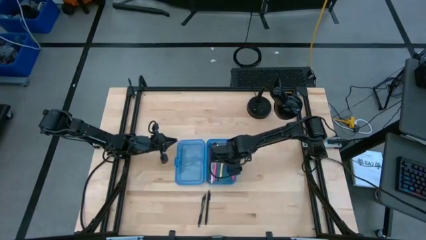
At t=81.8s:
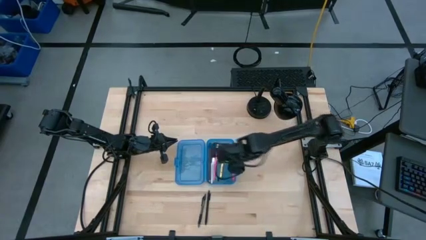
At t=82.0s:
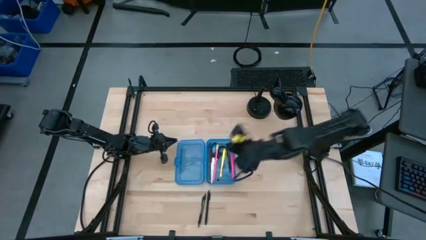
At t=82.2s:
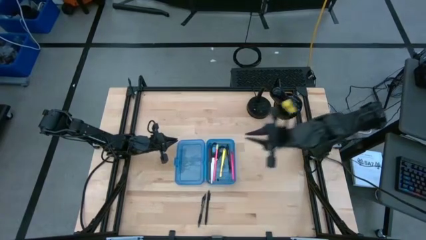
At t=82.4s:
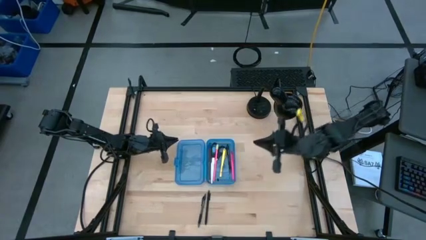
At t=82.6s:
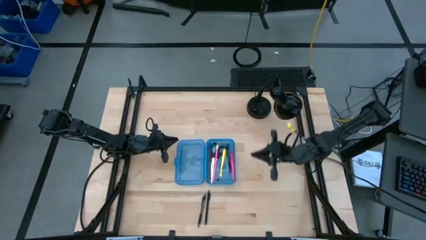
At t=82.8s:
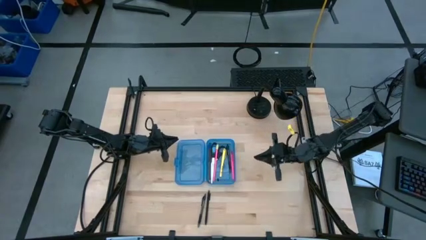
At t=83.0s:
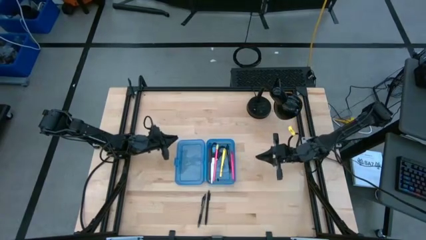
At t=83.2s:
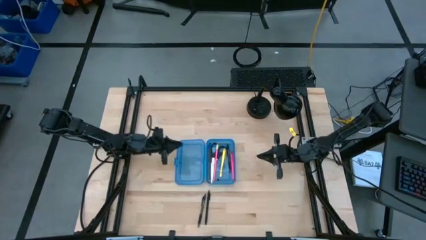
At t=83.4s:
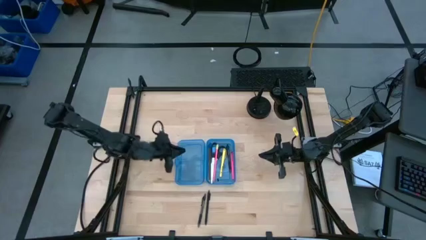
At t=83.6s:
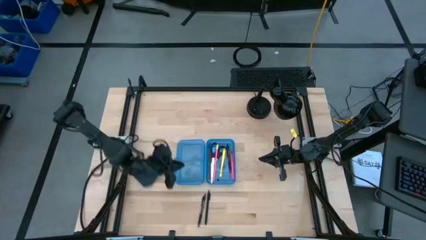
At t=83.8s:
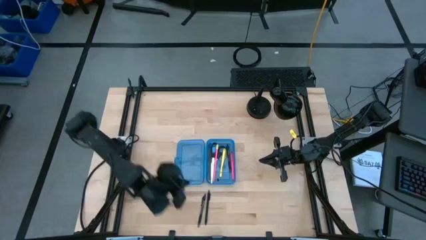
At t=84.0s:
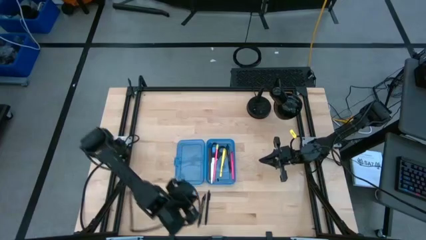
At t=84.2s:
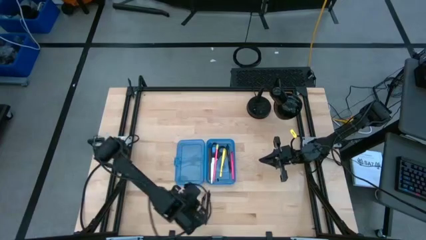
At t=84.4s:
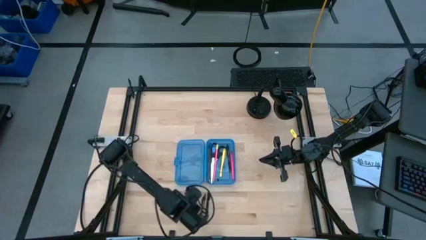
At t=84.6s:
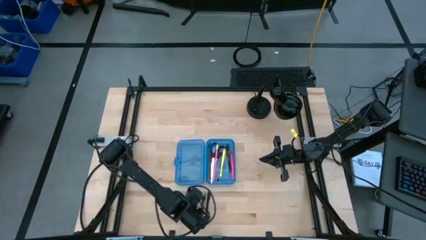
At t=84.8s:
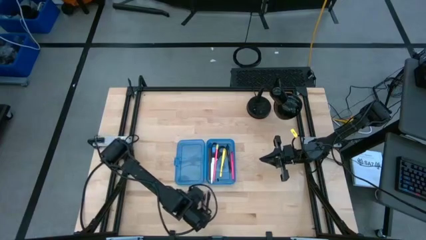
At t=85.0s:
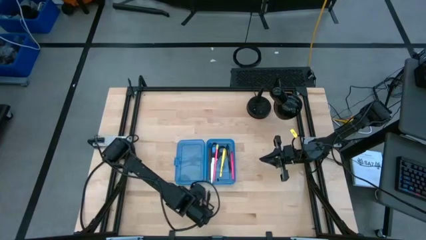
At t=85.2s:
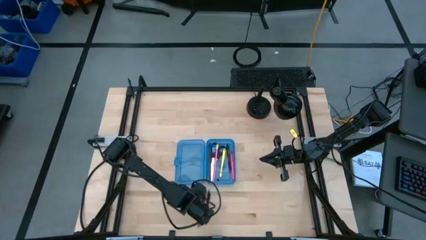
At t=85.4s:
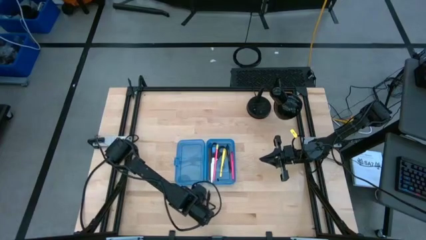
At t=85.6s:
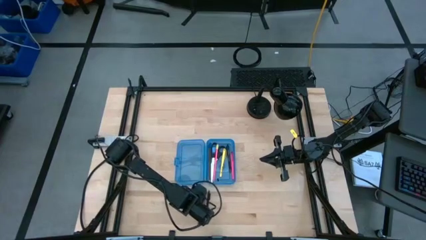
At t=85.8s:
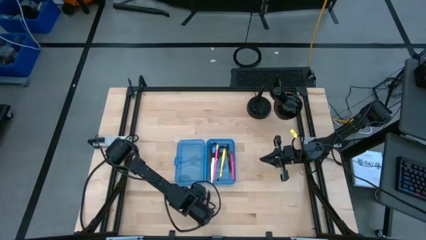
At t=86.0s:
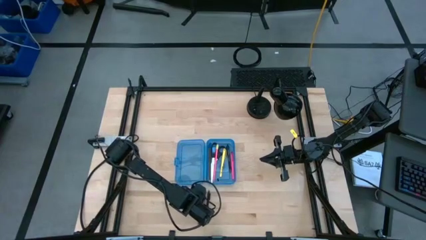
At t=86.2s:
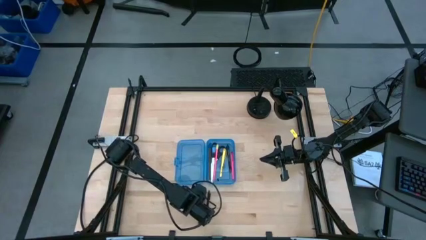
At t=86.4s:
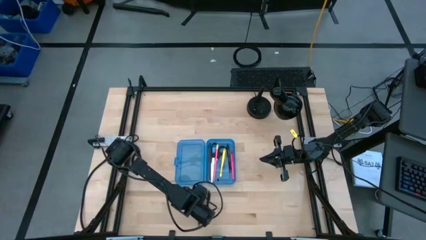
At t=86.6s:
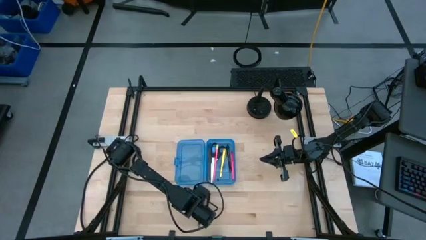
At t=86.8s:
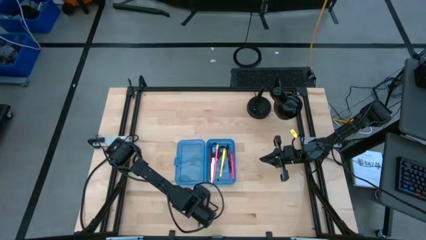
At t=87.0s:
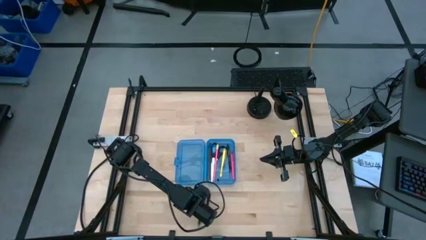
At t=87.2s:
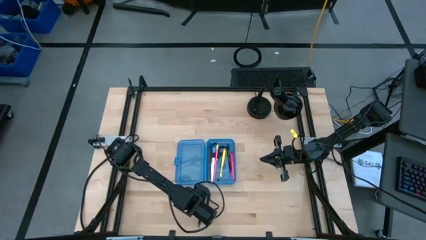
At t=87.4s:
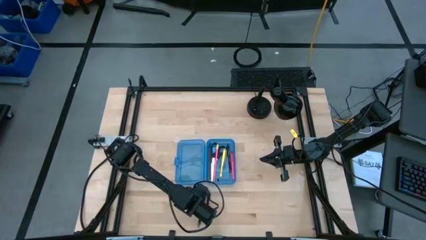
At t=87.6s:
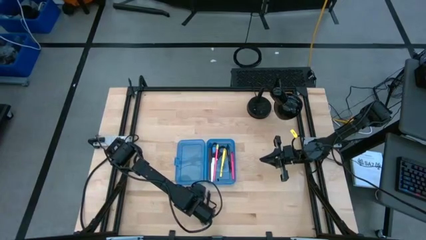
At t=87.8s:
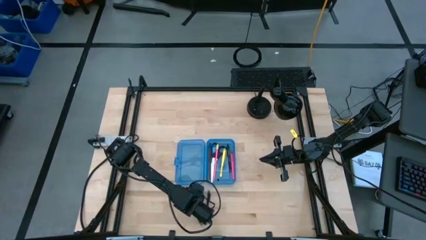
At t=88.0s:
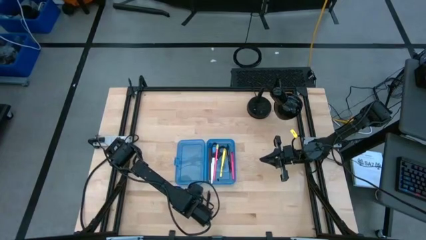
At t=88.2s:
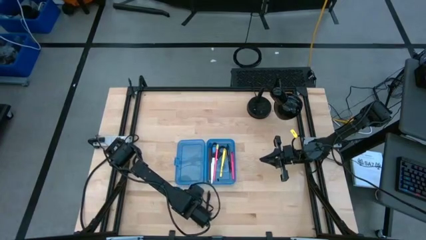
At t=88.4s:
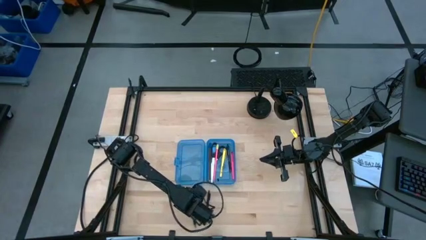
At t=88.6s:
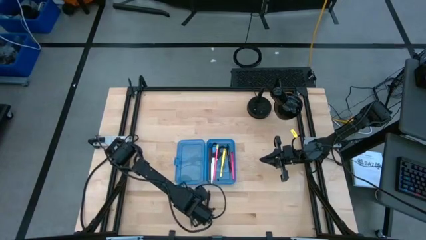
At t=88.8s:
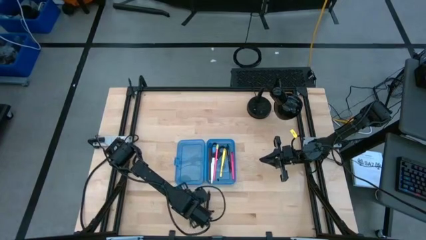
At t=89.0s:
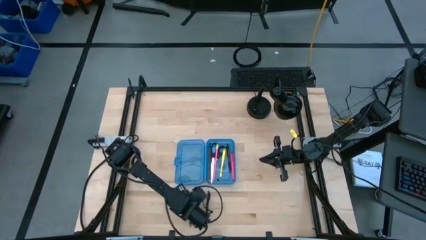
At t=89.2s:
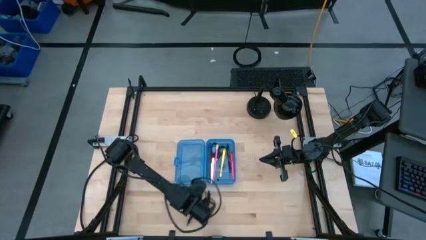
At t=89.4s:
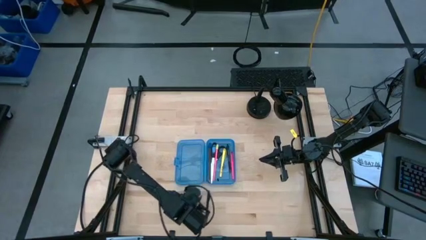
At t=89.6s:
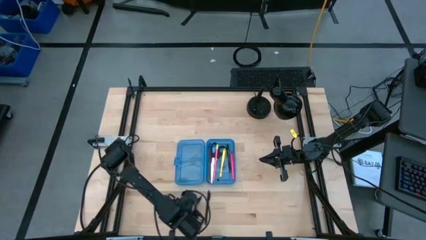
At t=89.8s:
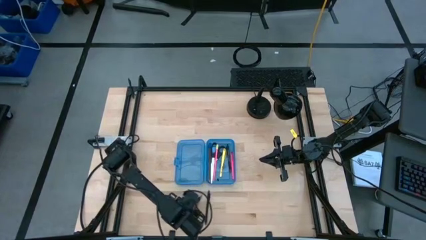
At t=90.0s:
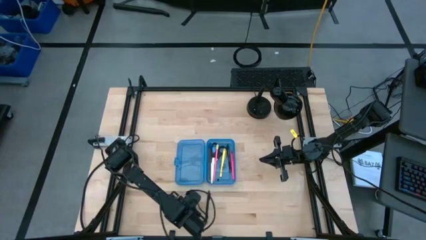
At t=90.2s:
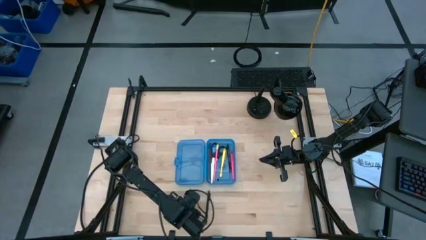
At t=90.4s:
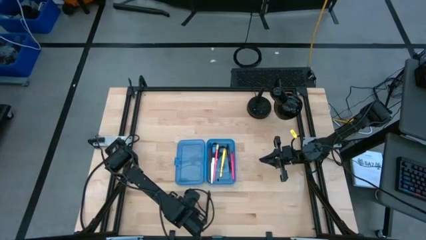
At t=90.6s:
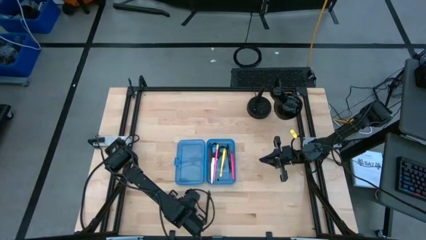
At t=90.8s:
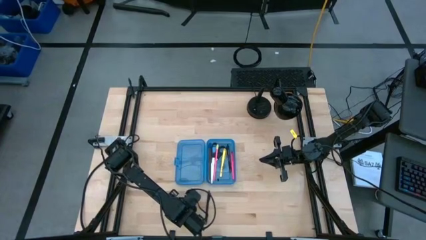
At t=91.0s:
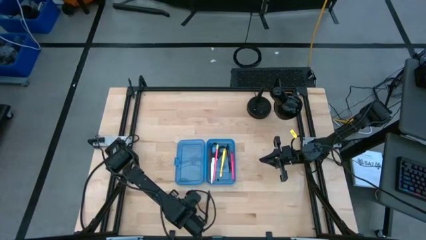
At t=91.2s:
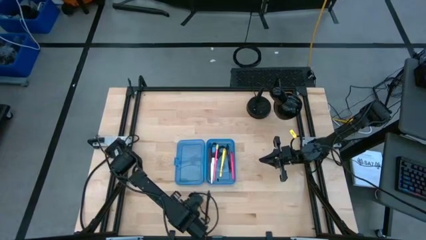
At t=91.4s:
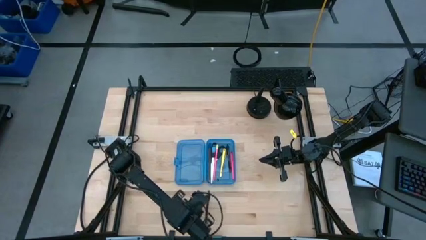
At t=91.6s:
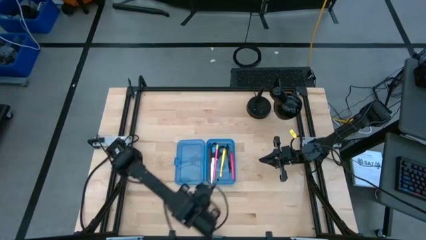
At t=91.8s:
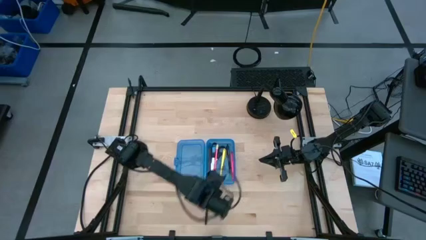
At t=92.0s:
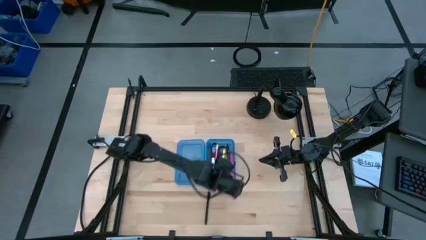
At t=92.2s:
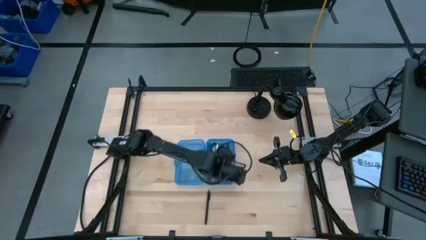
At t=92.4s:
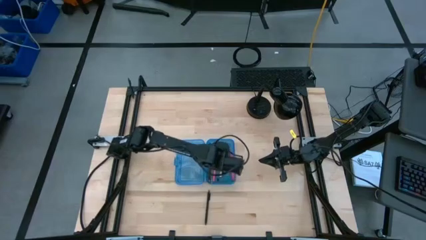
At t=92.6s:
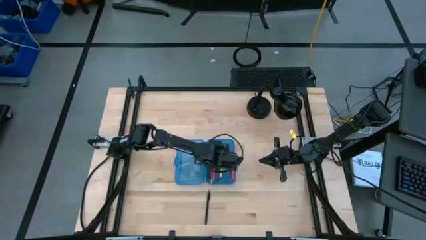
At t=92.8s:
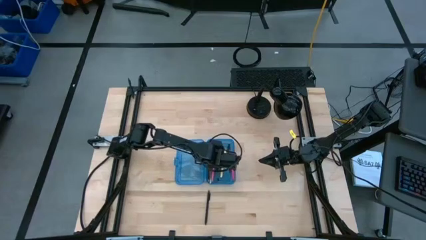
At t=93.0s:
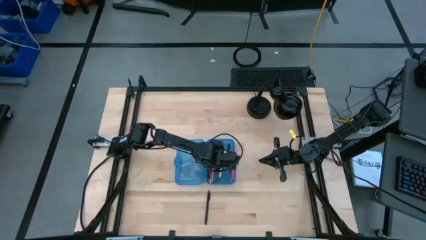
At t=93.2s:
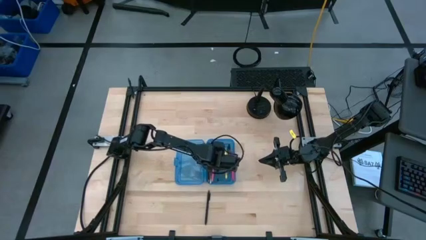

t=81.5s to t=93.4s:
Task: Pick & place school supplies into a supply box
Put the left black pen into the blue supply box

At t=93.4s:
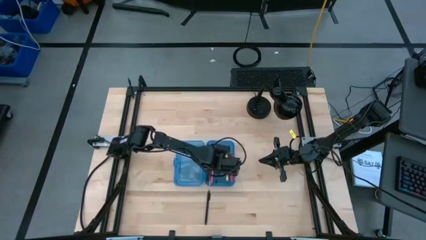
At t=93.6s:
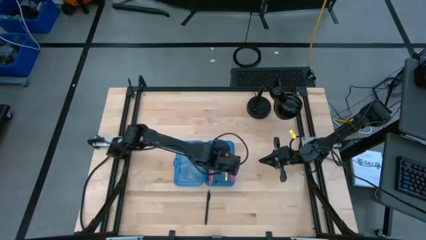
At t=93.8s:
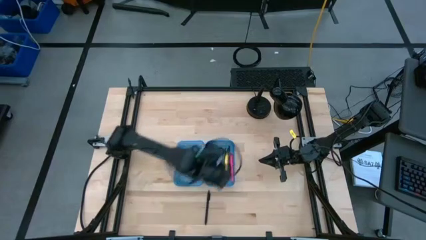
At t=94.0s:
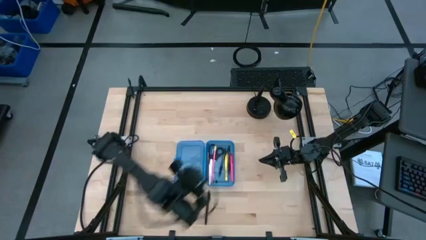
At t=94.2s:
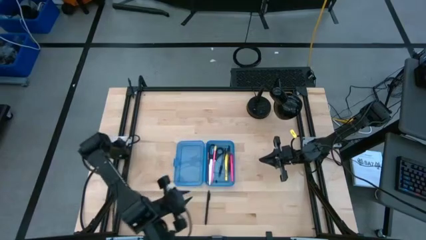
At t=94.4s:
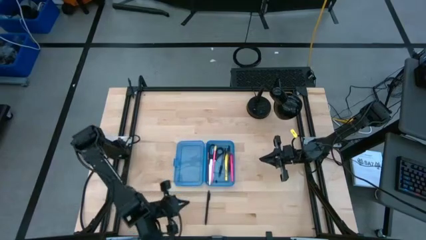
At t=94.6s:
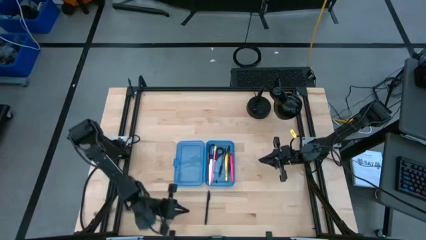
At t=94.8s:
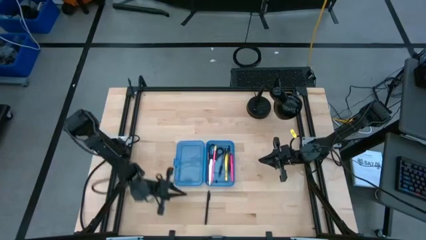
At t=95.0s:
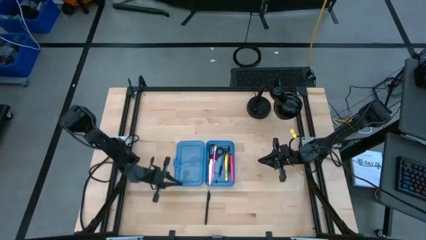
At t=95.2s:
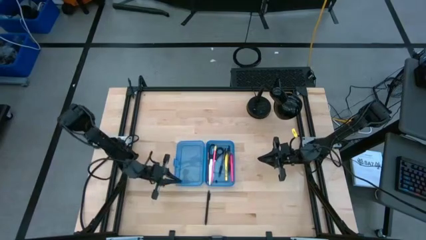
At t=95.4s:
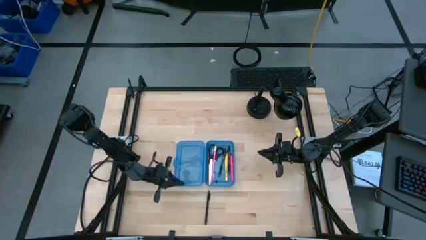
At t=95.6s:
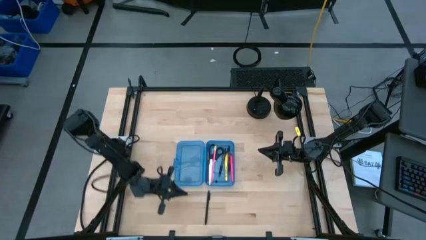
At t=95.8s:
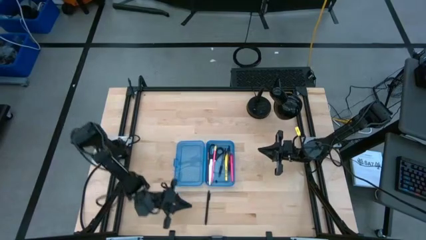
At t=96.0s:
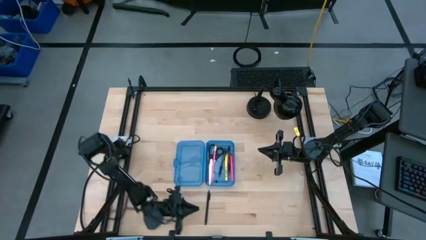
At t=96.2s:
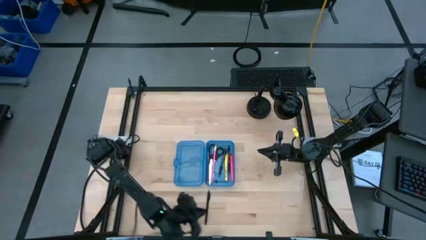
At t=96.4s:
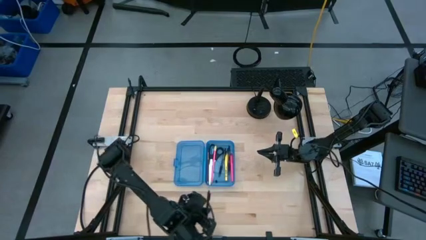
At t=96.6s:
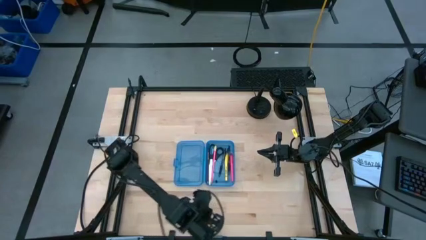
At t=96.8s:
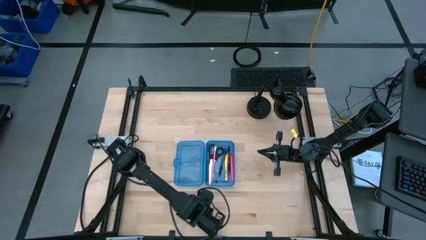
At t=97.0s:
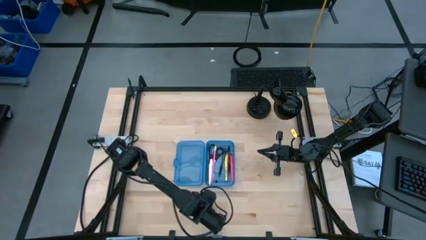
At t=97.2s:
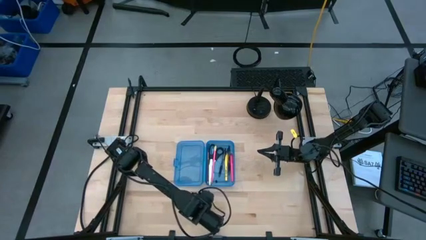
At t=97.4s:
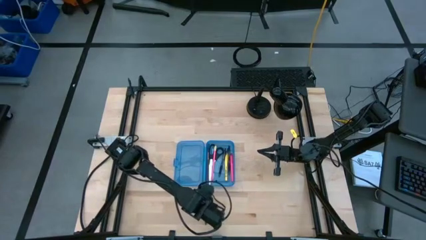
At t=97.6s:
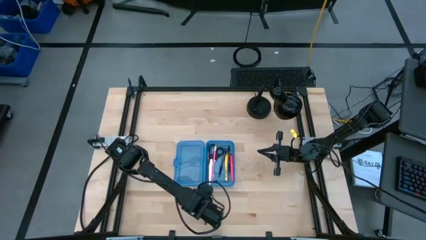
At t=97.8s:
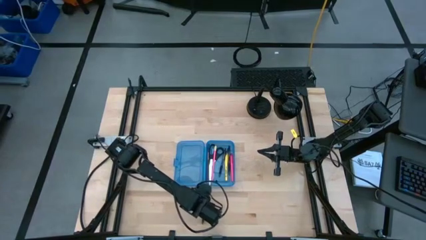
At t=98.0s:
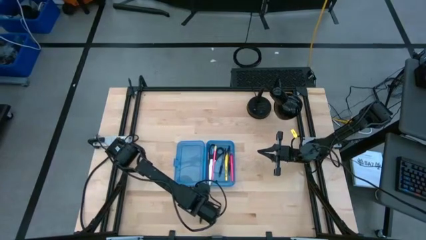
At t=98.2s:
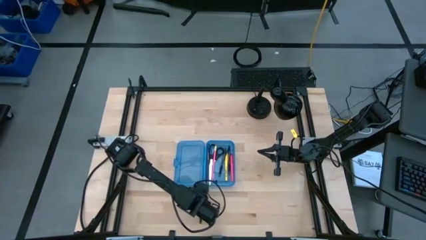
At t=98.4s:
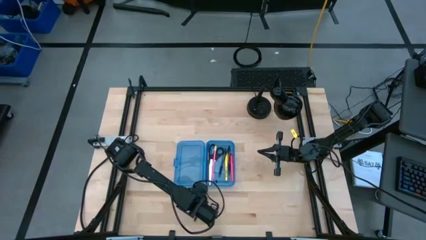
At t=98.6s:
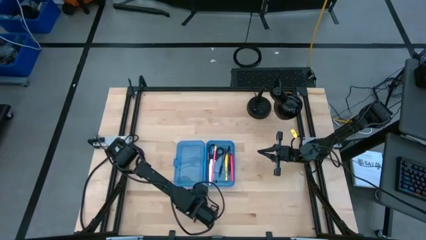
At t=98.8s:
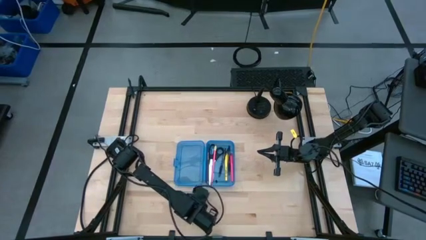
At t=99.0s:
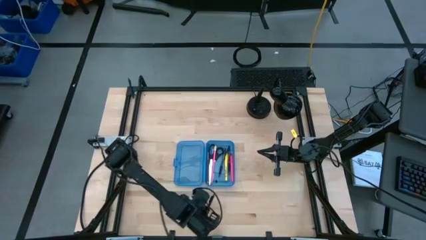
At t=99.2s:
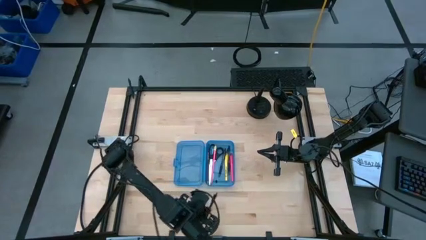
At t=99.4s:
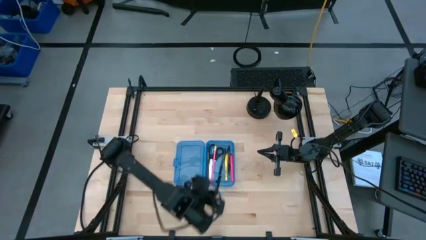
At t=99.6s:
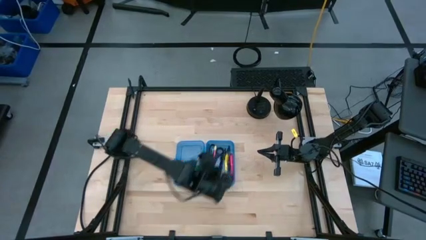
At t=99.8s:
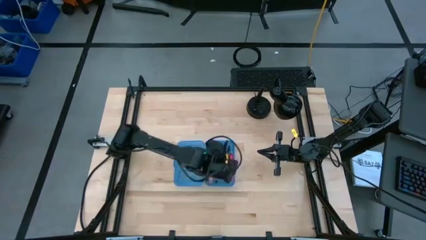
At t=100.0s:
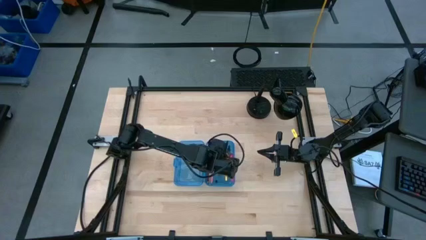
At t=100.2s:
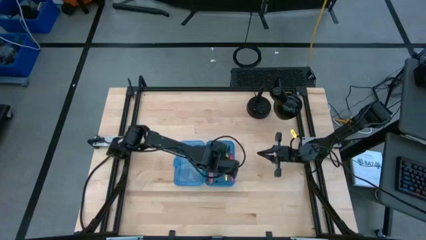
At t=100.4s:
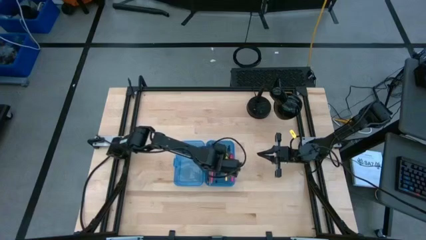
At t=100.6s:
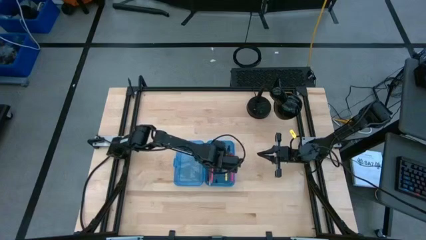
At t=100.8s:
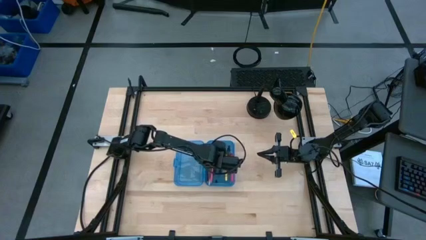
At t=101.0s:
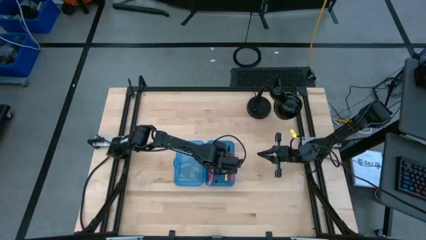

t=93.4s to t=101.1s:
Put the black pen into the blue supply box
